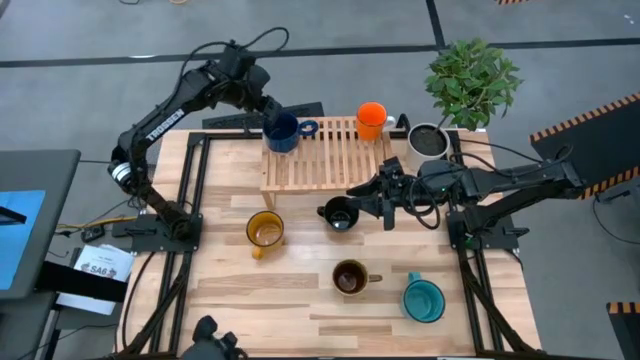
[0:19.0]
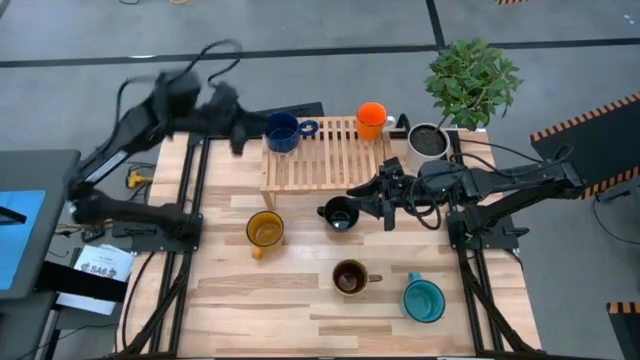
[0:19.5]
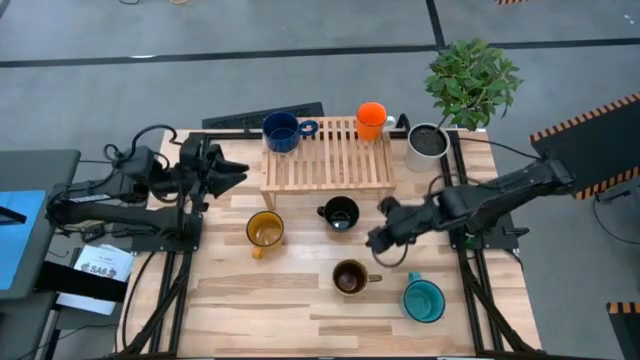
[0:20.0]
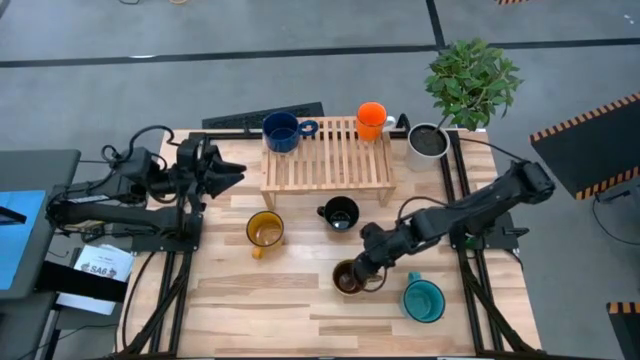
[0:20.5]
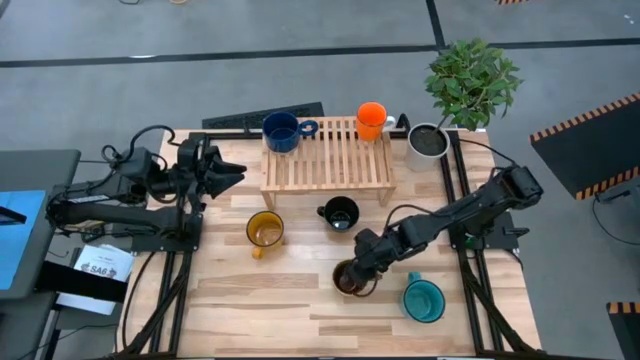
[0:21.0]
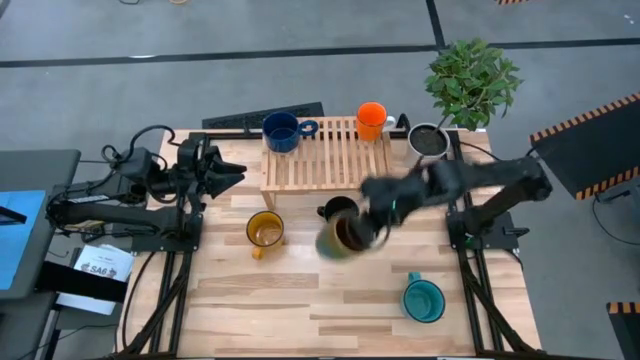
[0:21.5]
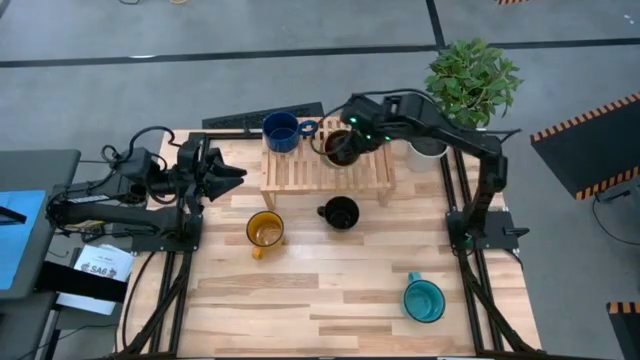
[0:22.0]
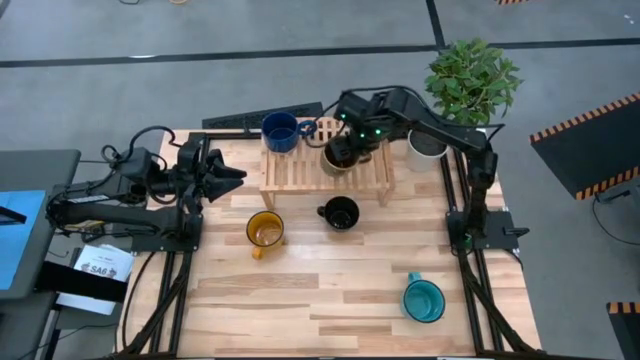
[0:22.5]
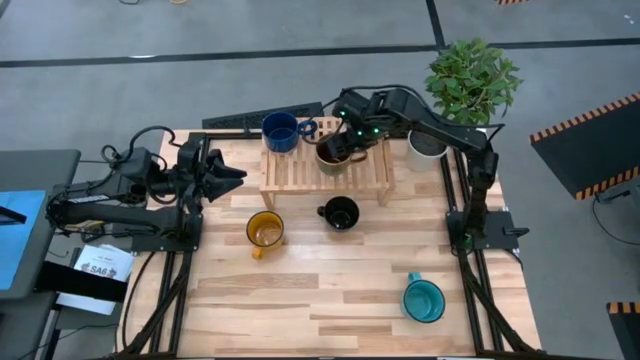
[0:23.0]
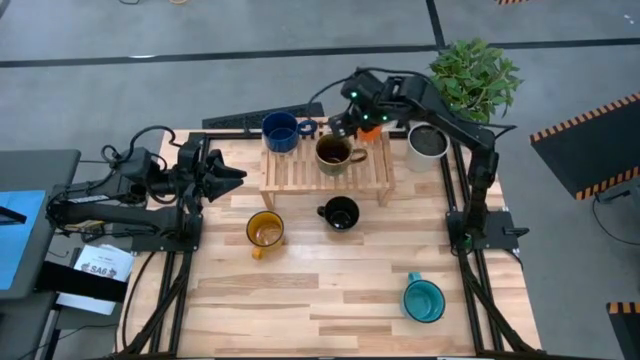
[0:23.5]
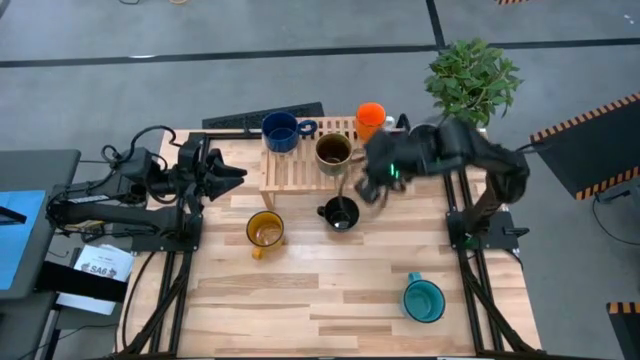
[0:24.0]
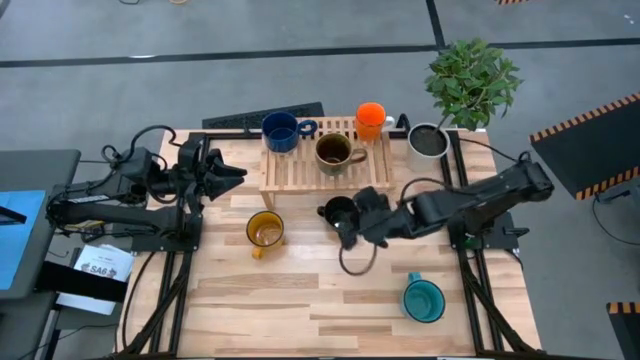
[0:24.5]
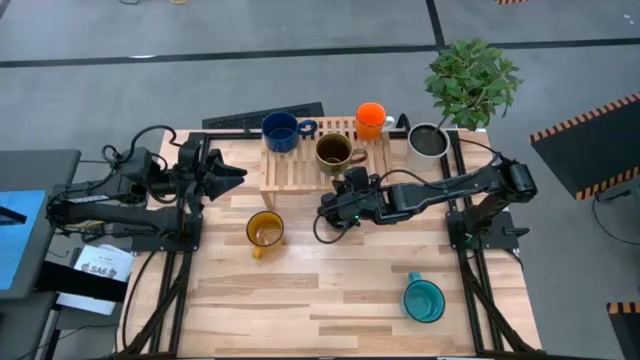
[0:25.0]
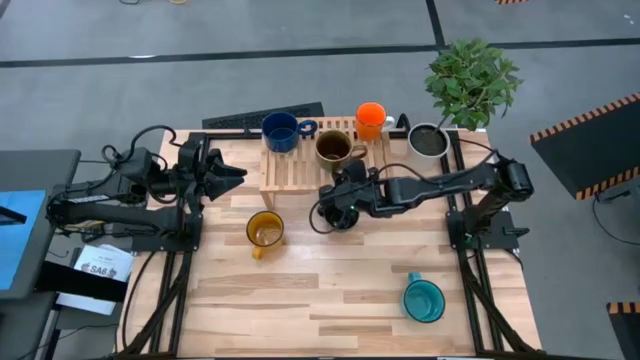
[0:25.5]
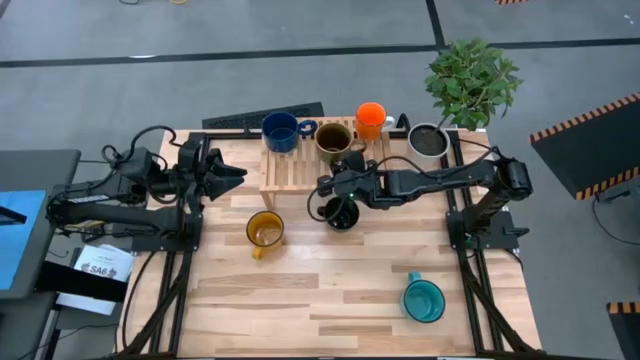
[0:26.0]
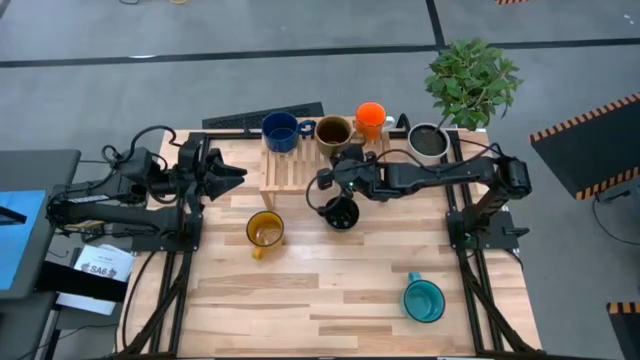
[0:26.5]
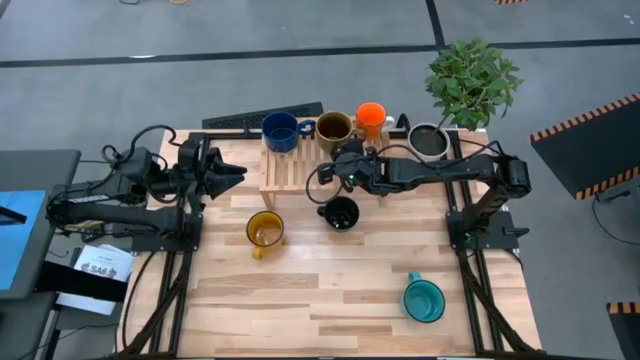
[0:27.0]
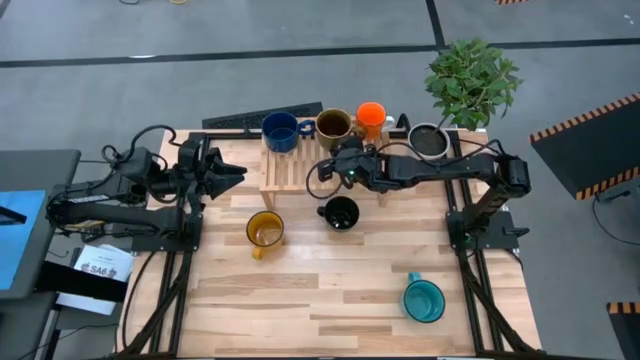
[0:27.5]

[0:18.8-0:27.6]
Task: Place coffee mugs
Put the brown mug on the shelf

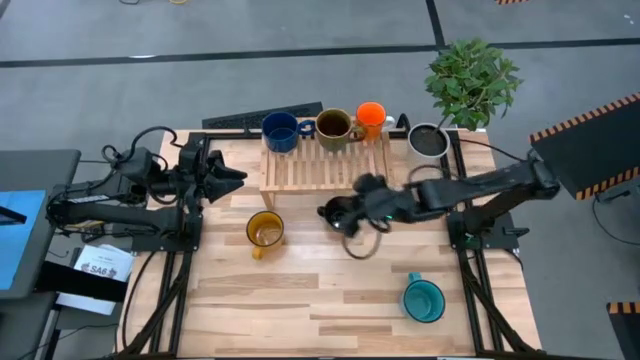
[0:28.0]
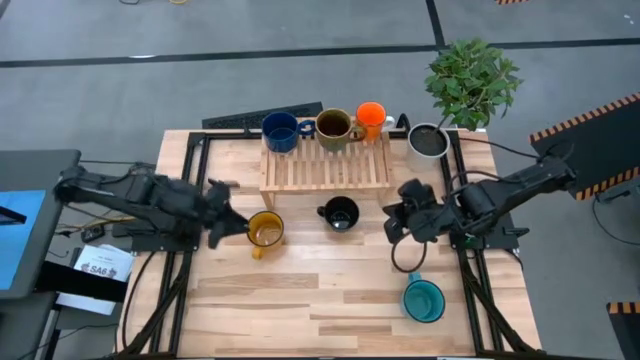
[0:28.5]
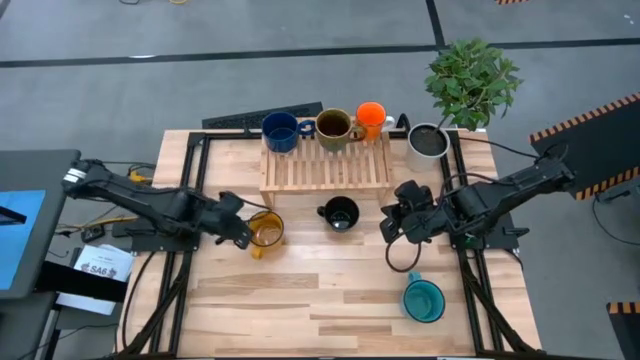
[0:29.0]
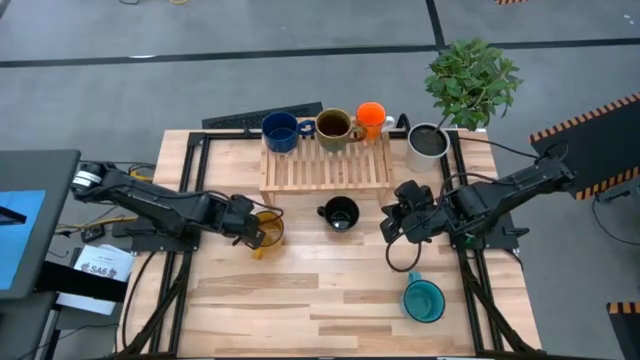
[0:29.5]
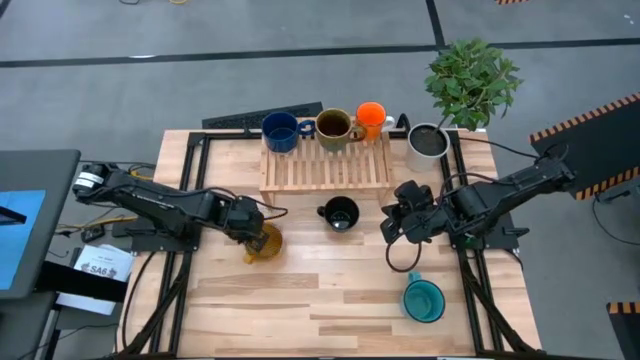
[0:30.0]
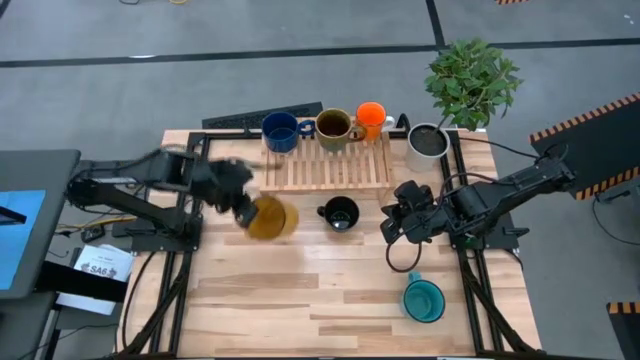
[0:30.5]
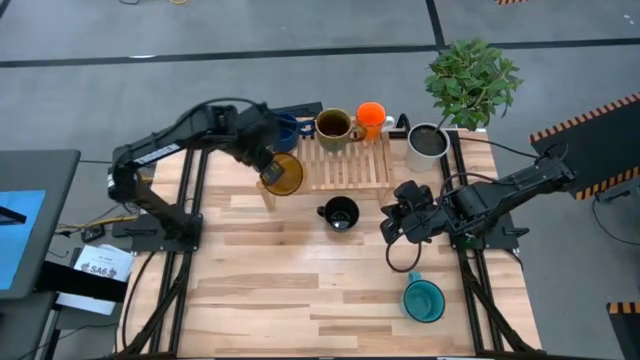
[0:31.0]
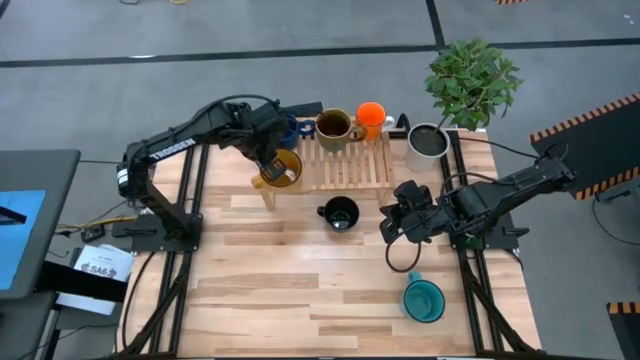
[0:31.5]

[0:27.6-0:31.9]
Put the yellow mug on the shelf

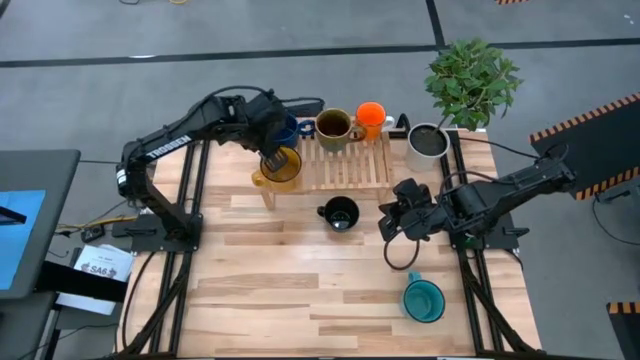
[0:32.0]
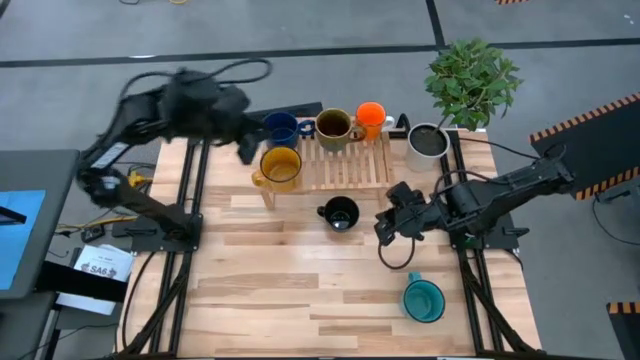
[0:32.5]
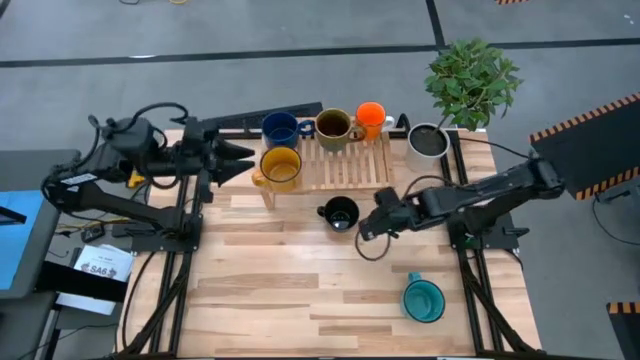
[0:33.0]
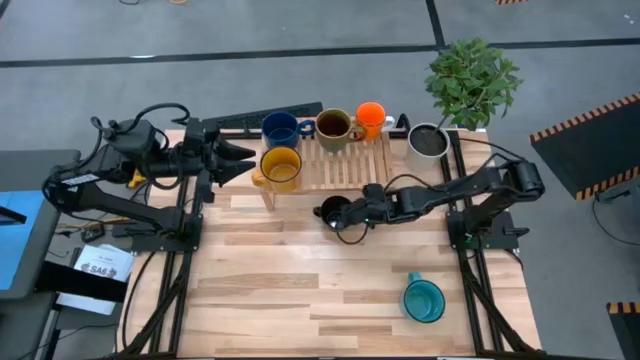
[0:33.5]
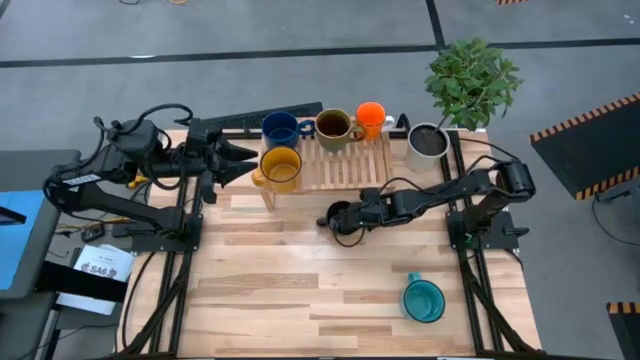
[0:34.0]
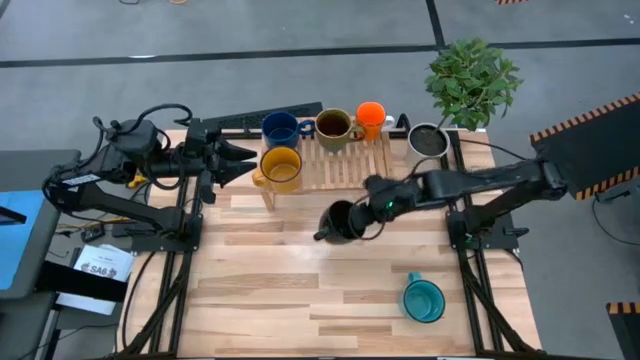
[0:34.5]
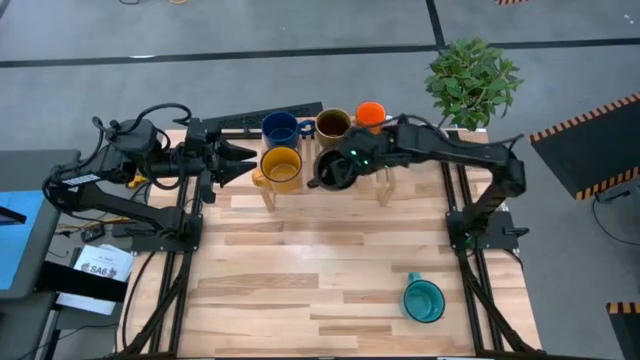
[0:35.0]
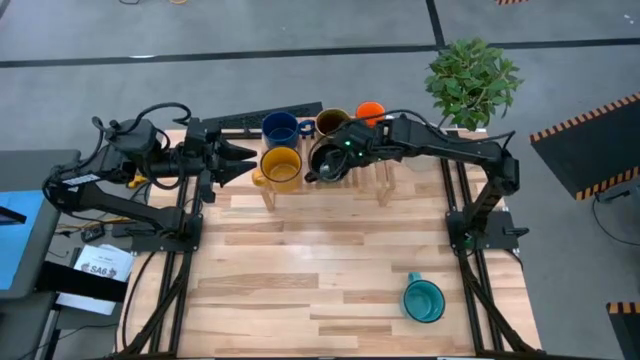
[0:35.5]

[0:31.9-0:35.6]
Put the black mug on the shelf

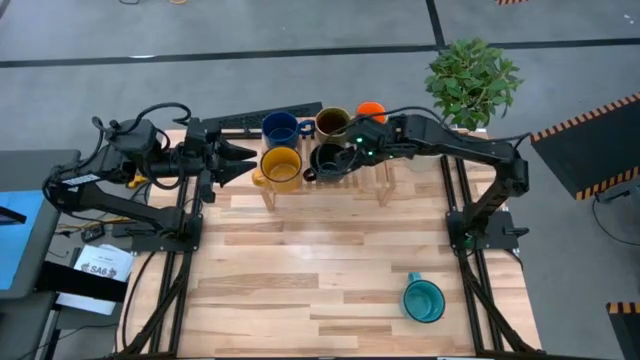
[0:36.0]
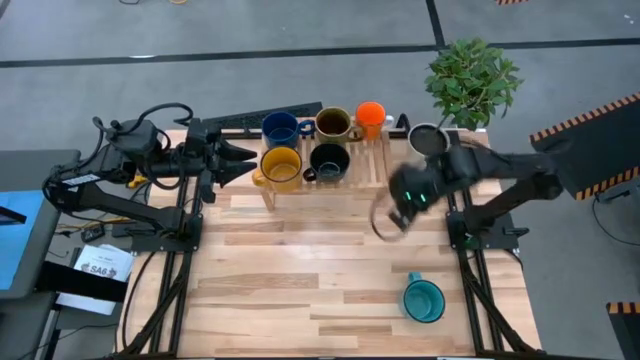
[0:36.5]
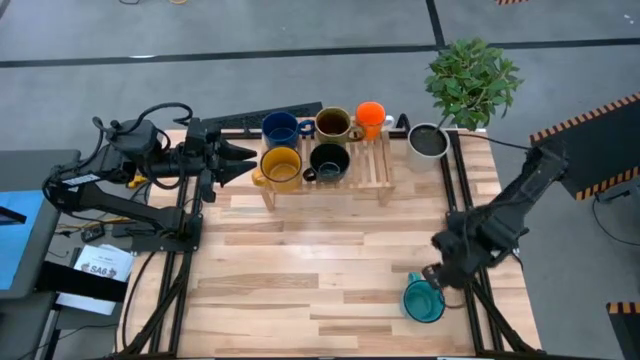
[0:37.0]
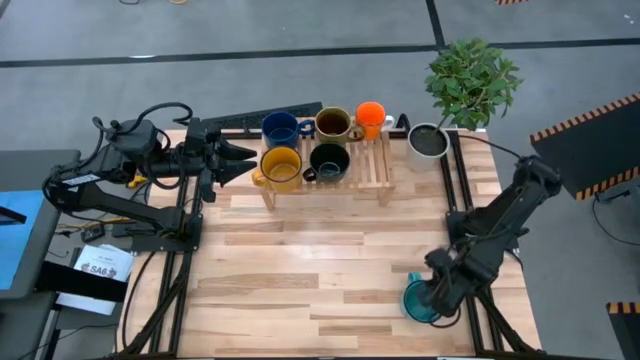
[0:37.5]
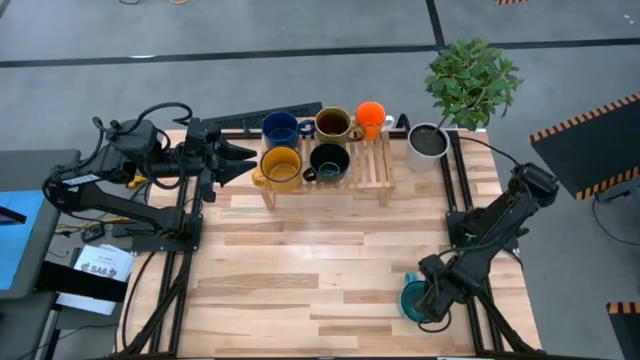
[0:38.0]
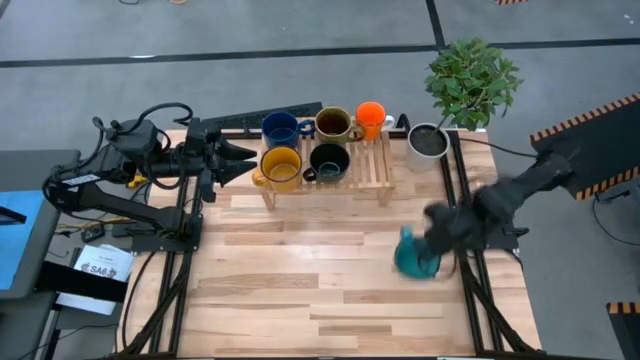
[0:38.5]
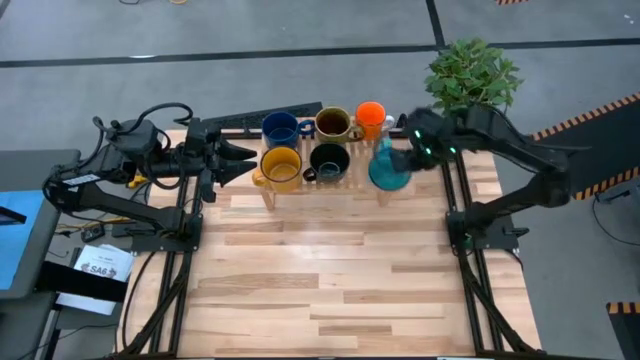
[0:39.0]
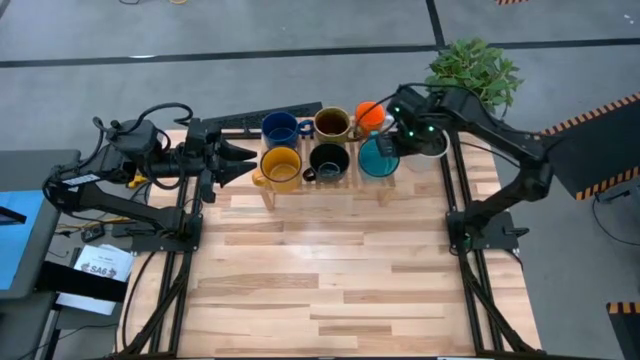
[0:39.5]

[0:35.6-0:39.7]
Put the light blue mug on the shelf
